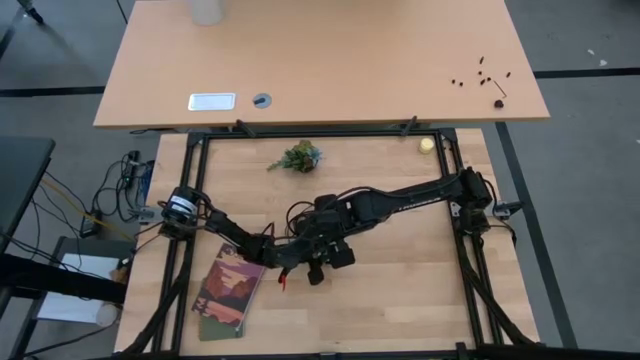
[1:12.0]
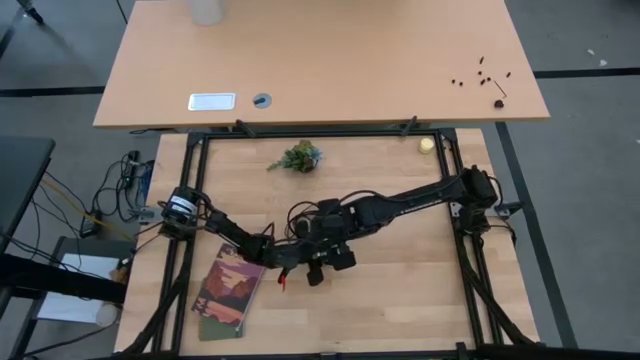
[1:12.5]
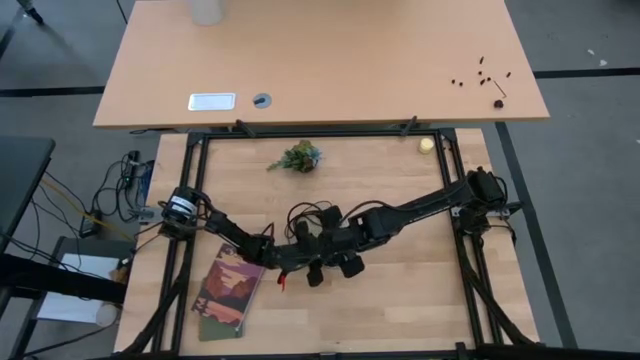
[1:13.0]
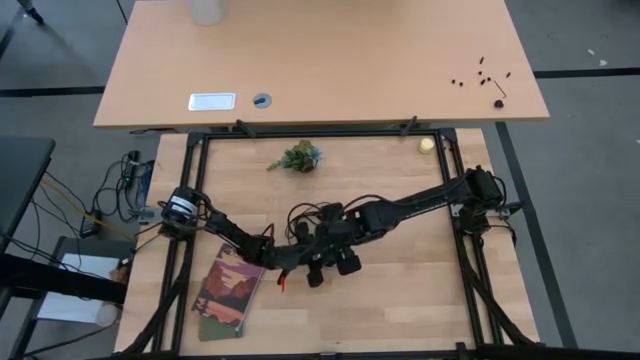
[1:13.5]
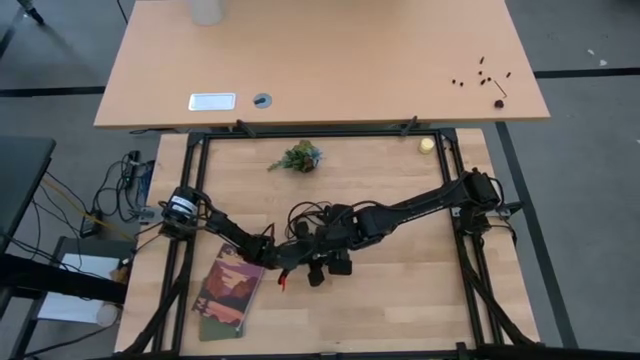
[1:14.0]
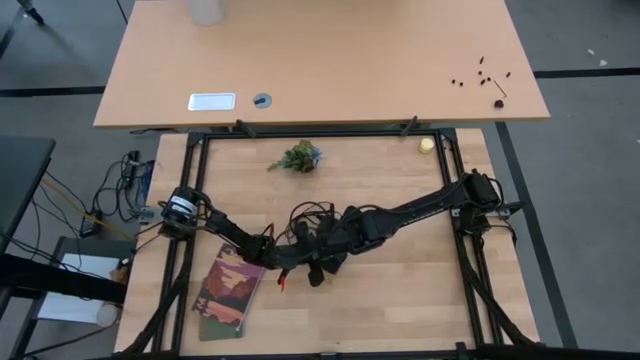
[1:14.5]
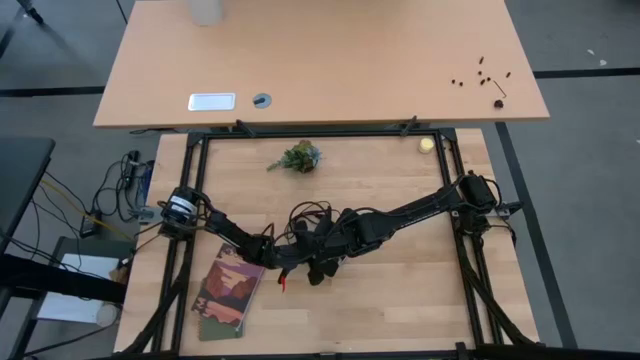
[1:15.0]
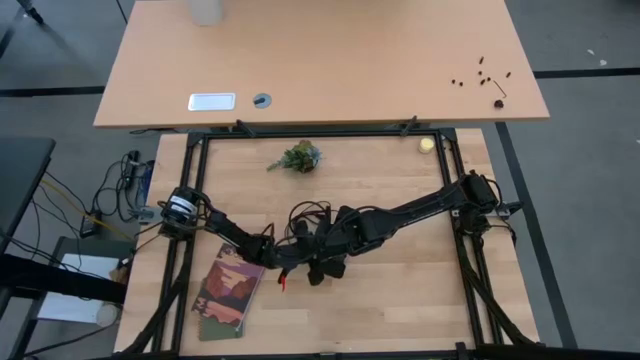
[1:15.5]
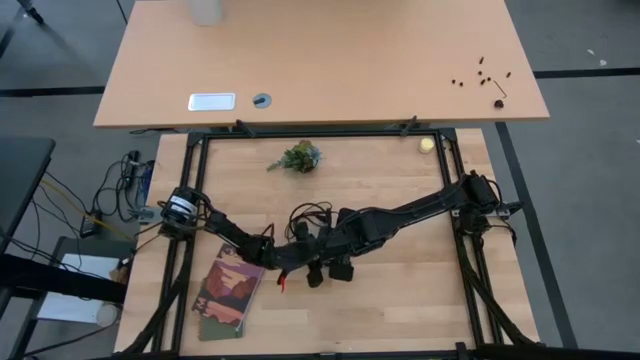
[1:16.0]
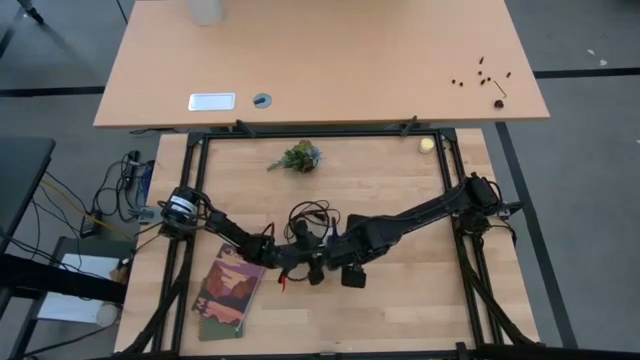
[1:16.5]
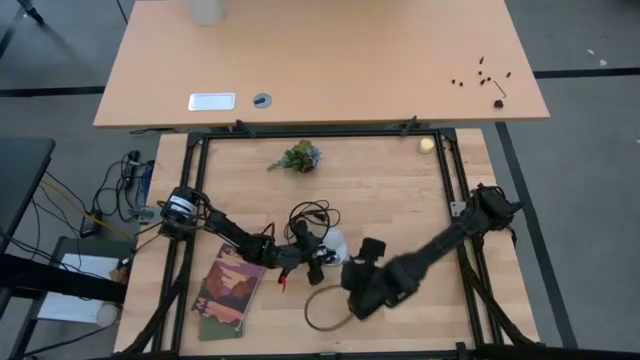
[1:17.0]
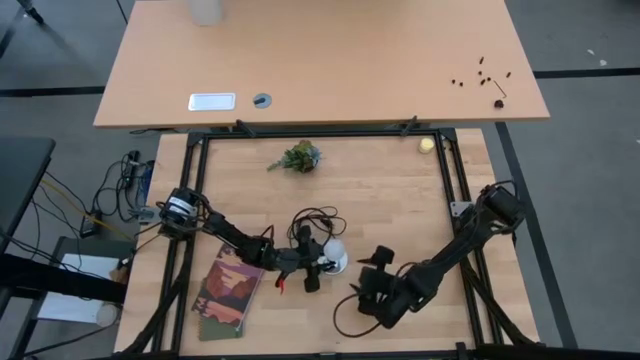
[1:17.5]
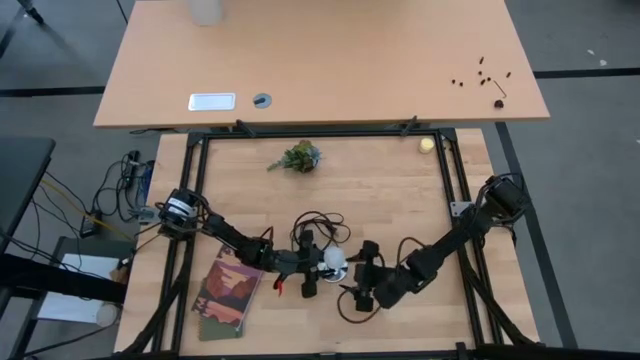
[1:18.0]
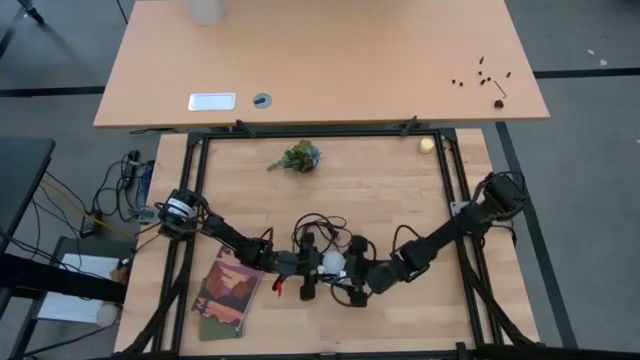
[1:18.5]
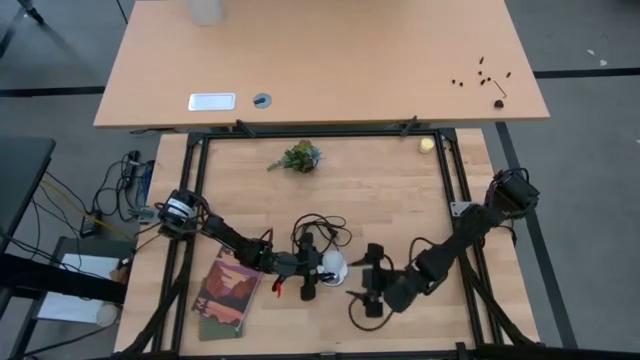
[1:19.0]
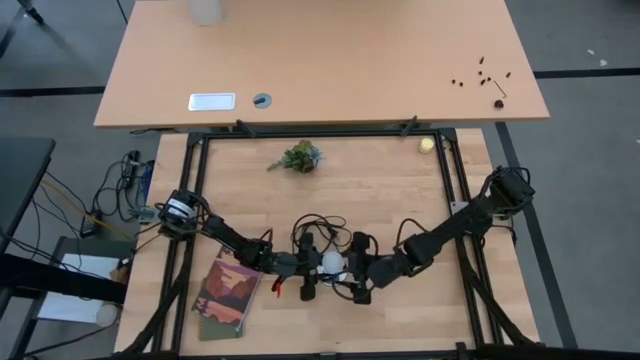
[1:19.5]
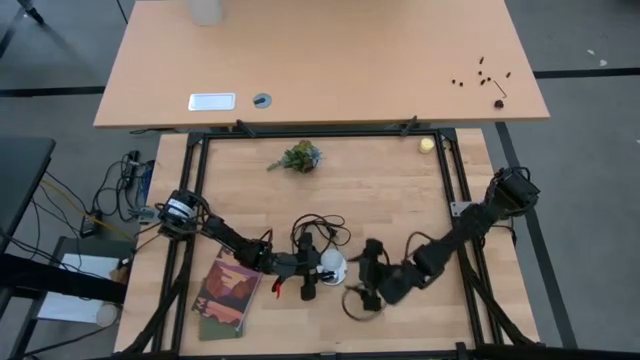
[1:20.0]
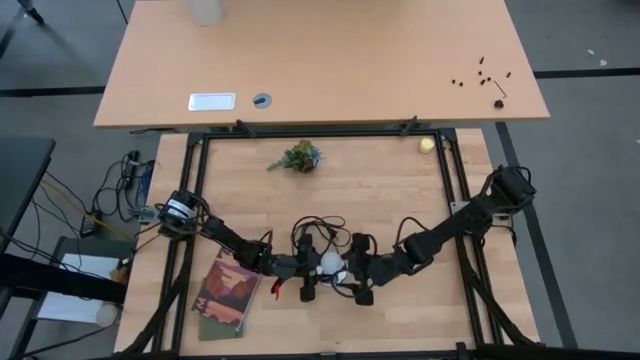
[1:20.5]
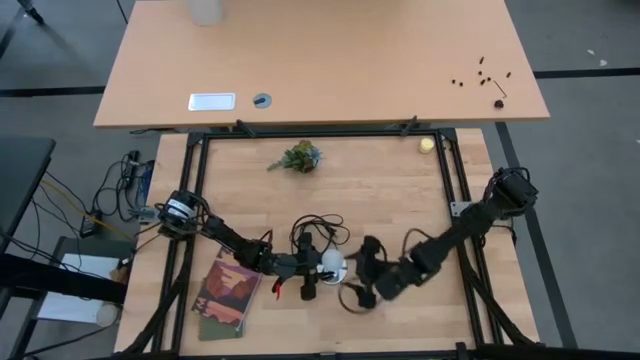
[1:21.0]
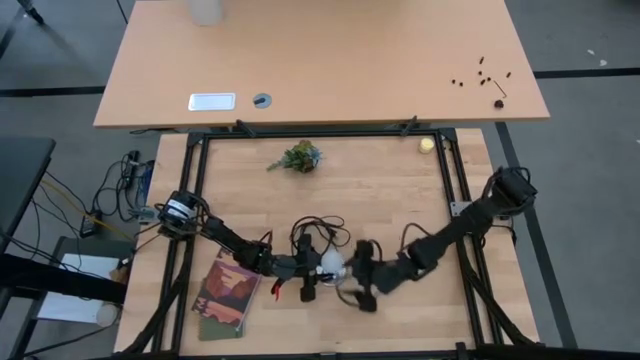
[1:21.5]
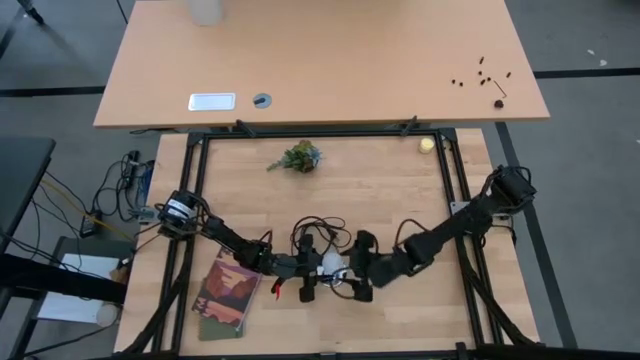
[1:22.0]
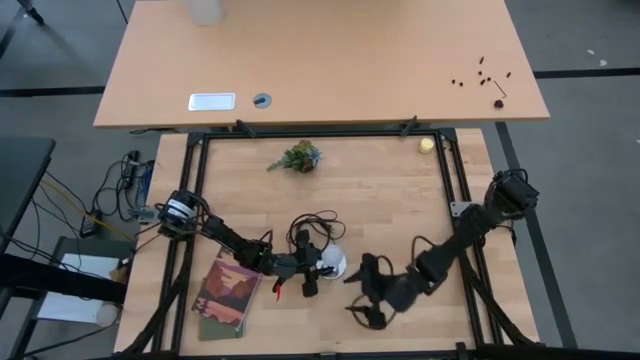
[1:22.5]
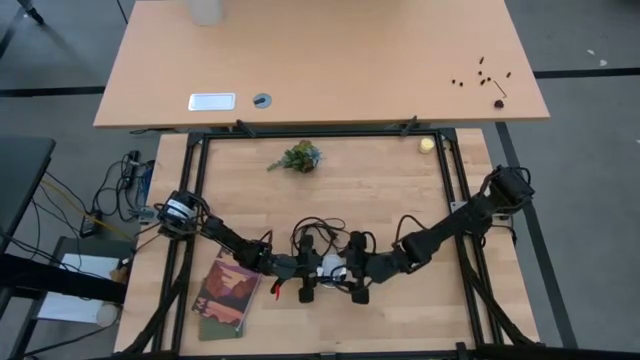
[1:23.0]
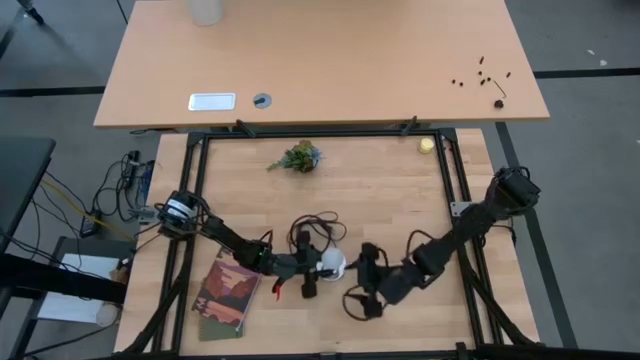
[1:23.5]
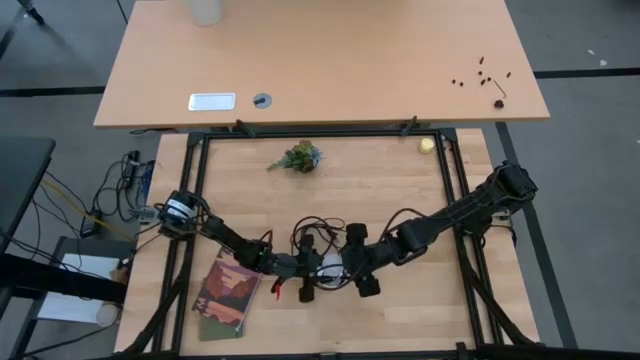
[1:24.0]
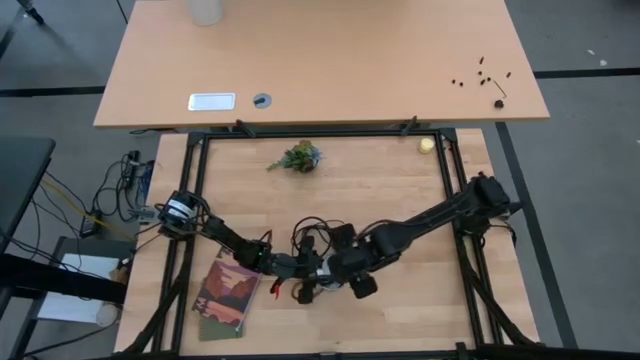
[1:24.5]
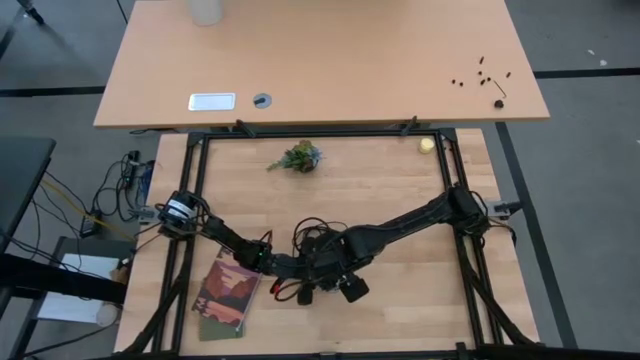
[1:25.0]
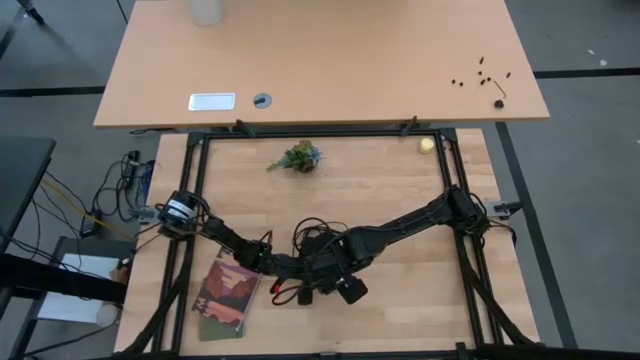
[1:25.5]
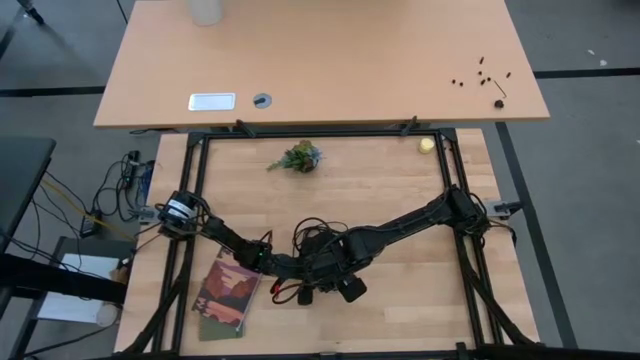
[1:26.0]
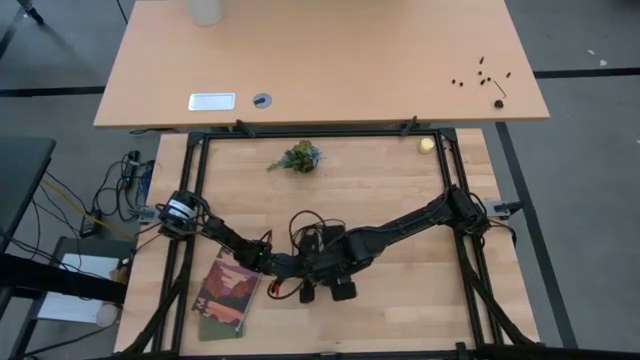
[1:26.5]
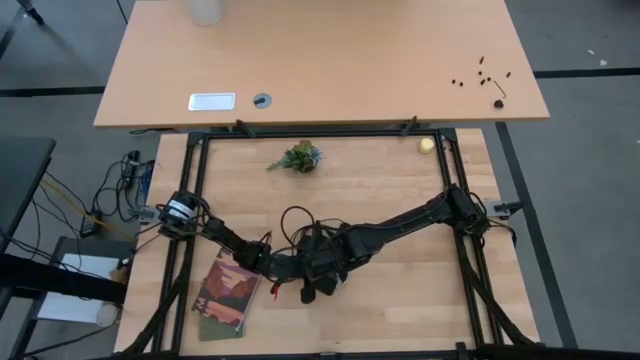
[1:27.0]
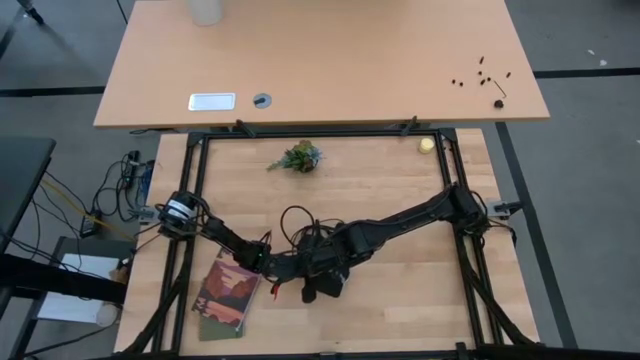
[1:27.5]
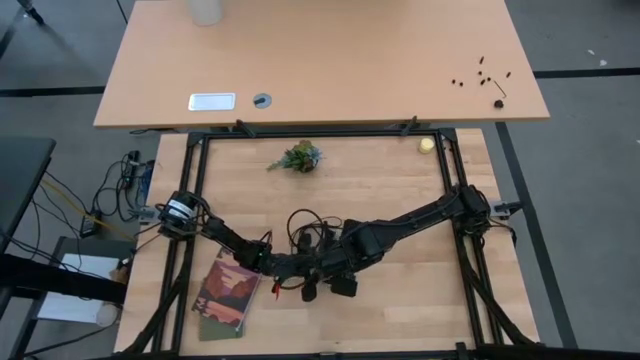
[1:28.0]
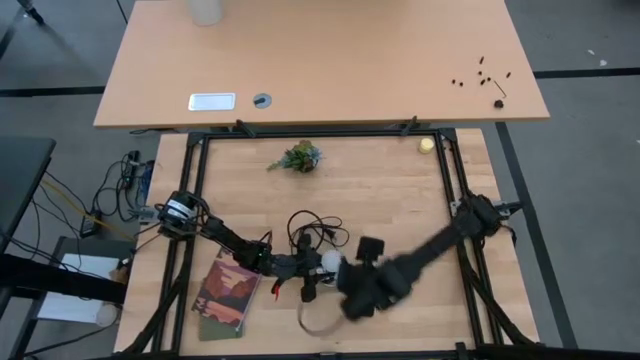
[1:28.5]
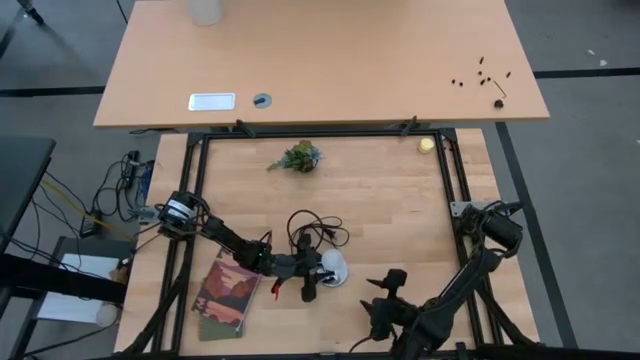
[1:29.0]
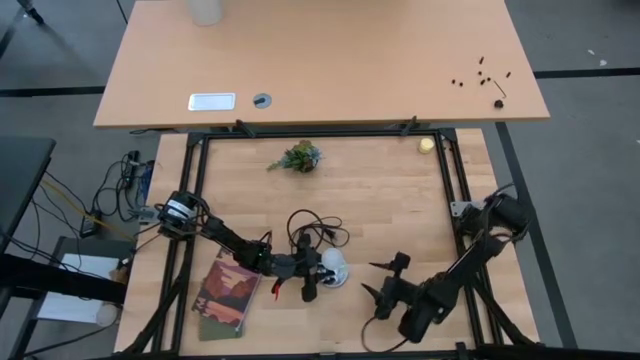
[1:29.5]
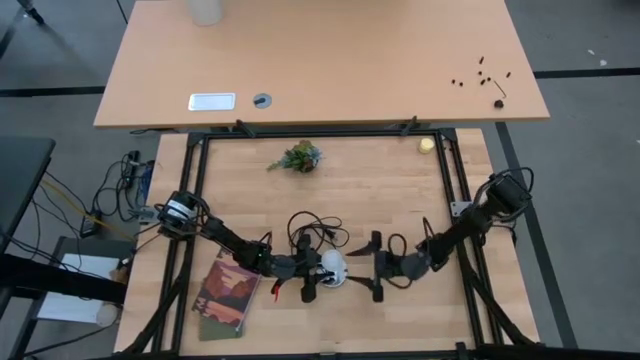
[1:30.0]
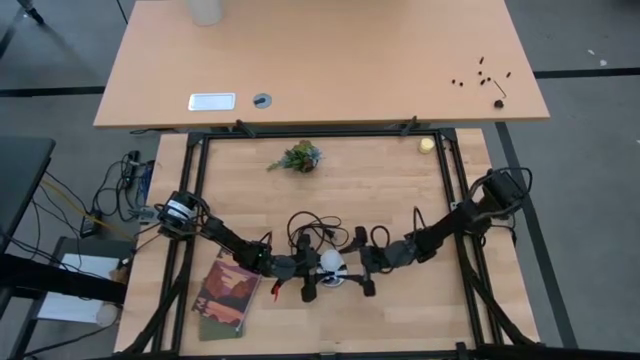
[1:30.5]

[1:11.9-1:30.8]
Task: Screw lightbulb
Insert the white lightbulb into the lamp socket
